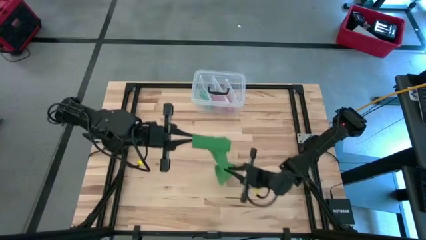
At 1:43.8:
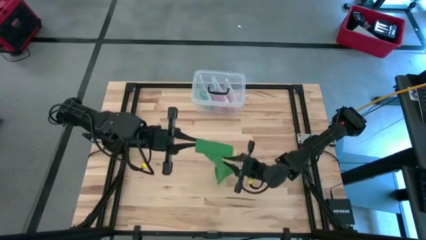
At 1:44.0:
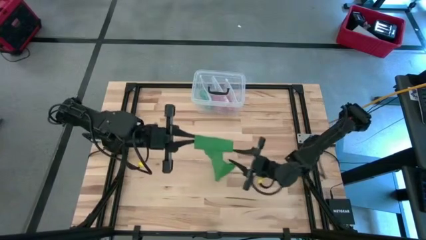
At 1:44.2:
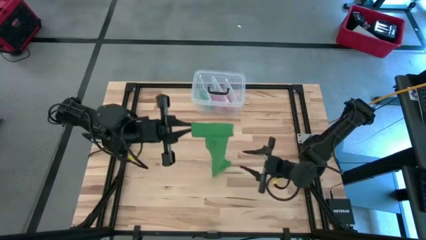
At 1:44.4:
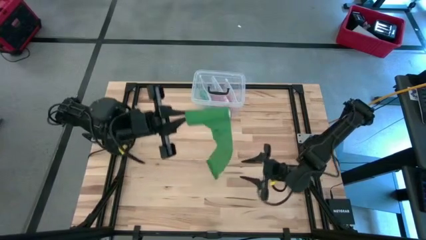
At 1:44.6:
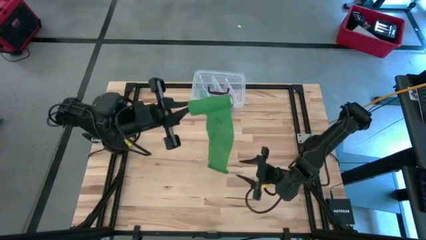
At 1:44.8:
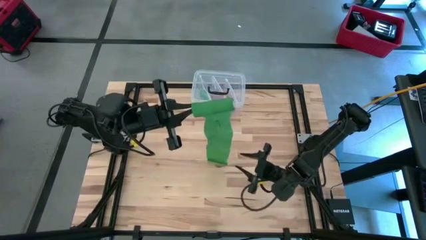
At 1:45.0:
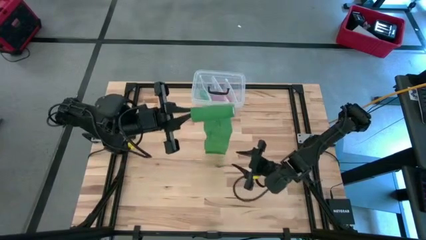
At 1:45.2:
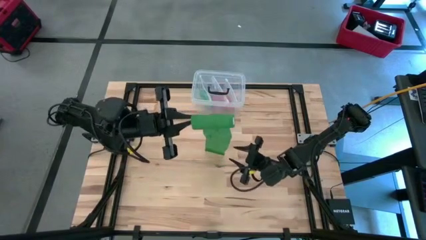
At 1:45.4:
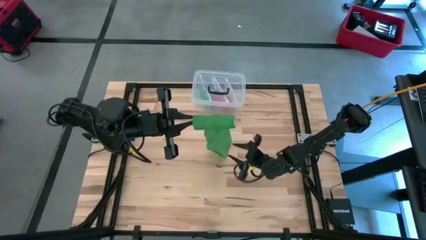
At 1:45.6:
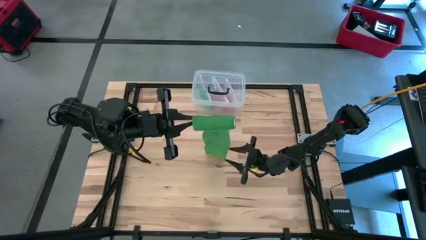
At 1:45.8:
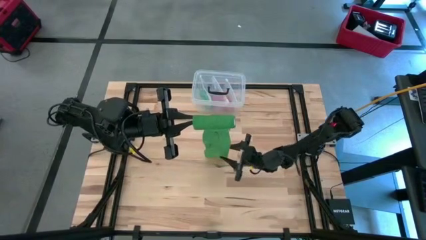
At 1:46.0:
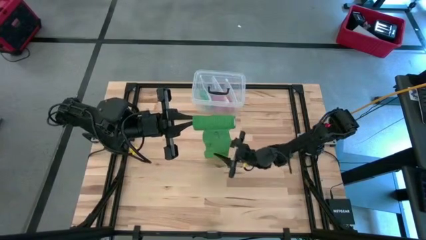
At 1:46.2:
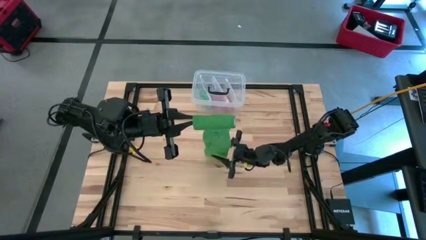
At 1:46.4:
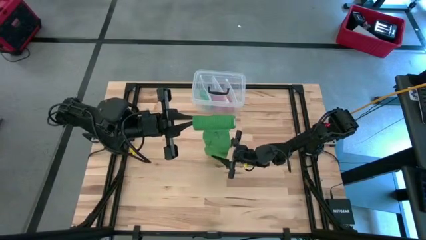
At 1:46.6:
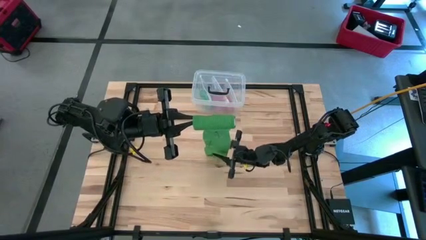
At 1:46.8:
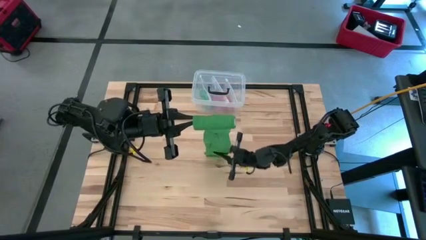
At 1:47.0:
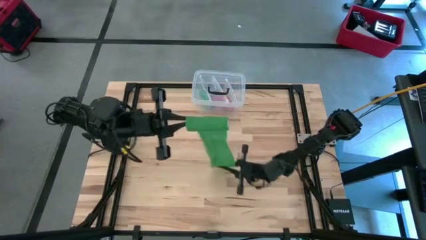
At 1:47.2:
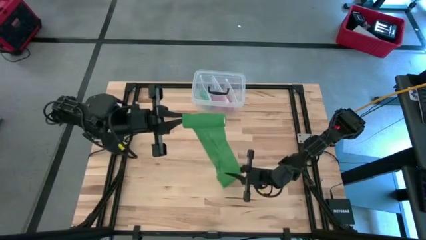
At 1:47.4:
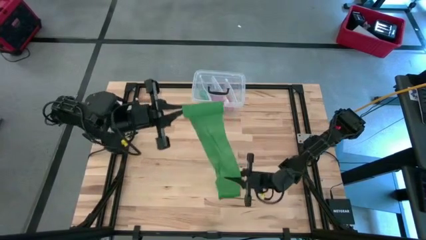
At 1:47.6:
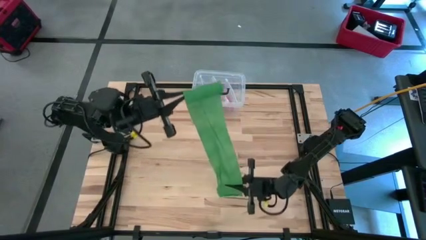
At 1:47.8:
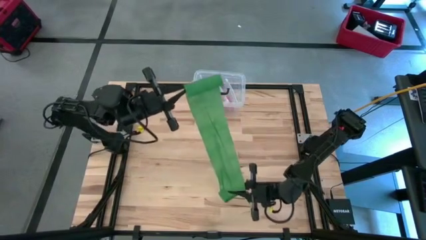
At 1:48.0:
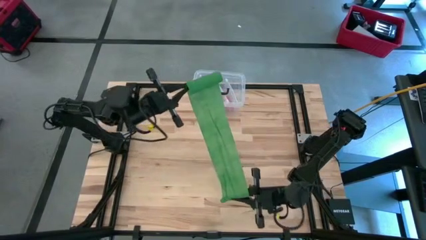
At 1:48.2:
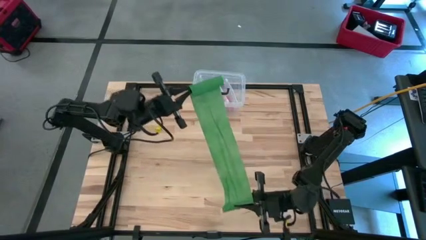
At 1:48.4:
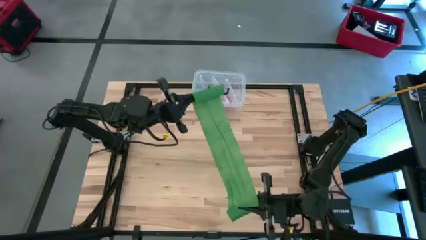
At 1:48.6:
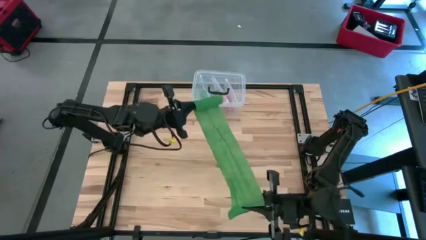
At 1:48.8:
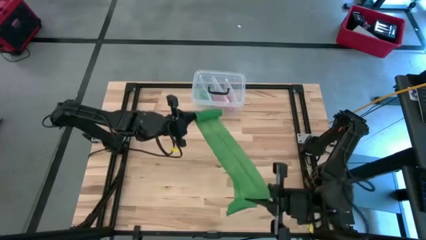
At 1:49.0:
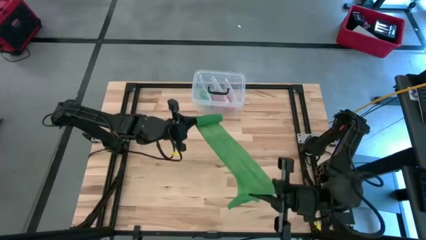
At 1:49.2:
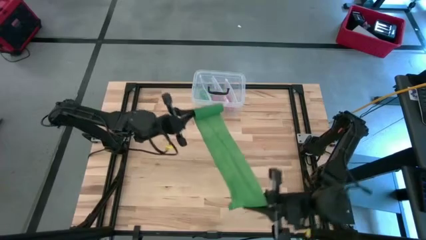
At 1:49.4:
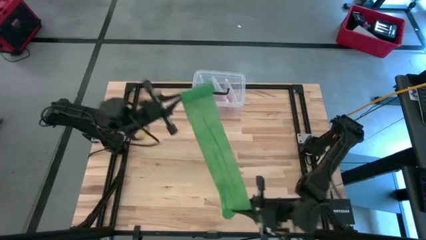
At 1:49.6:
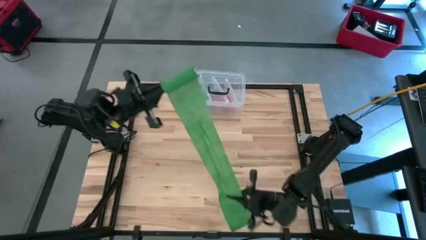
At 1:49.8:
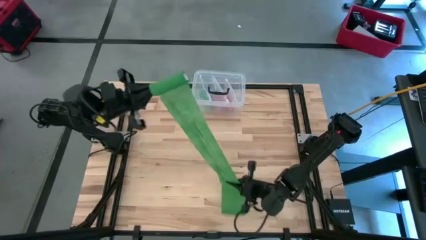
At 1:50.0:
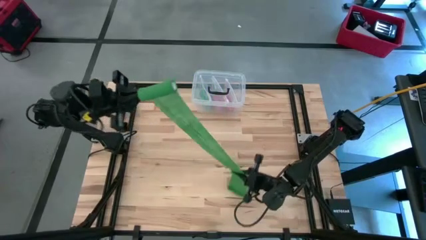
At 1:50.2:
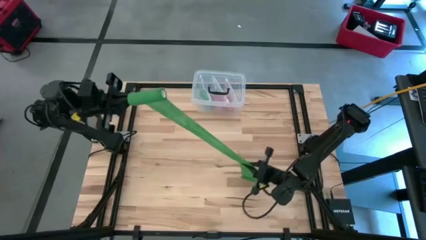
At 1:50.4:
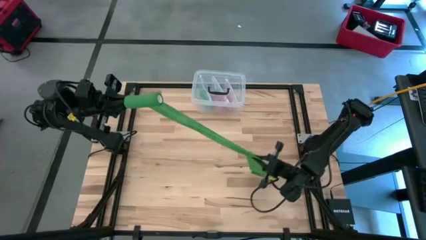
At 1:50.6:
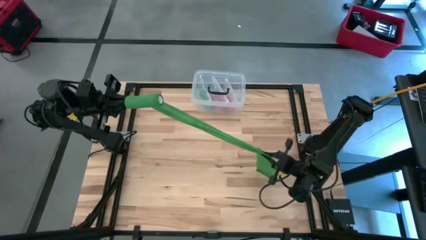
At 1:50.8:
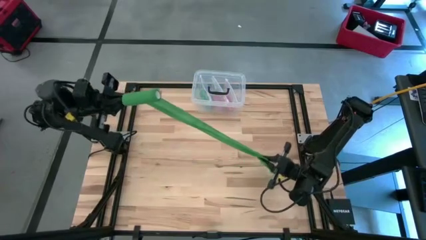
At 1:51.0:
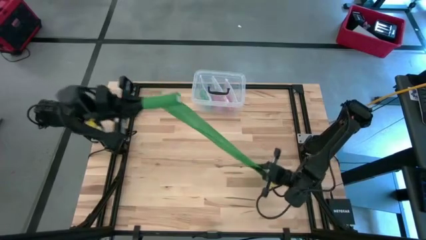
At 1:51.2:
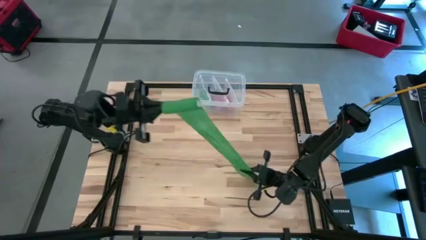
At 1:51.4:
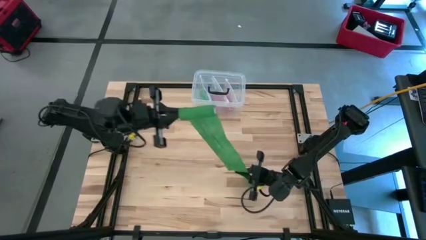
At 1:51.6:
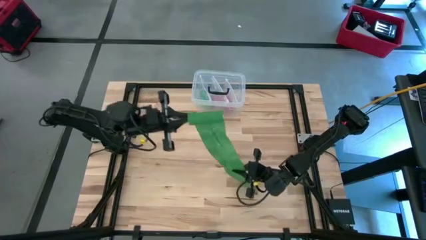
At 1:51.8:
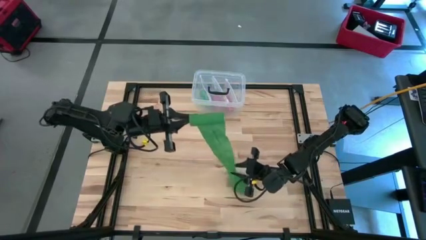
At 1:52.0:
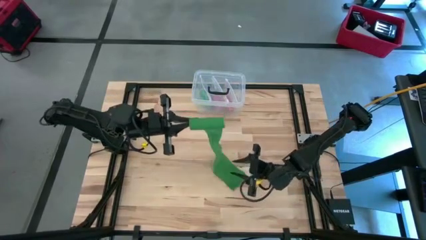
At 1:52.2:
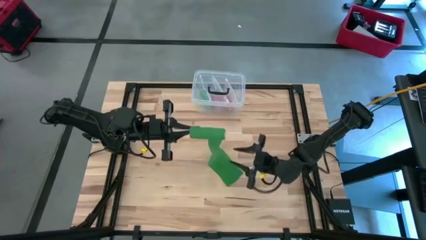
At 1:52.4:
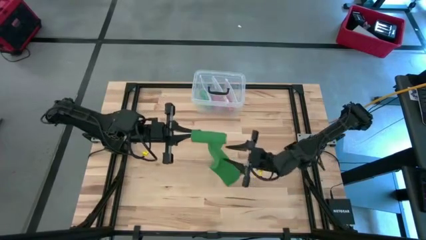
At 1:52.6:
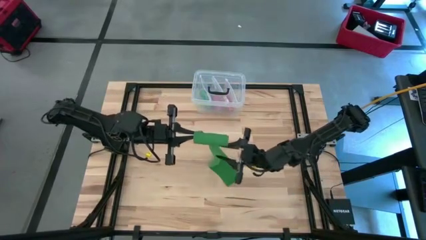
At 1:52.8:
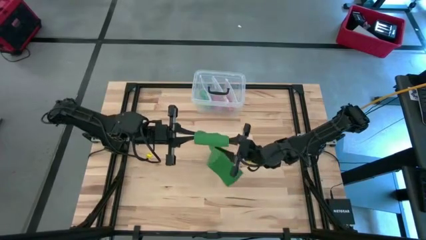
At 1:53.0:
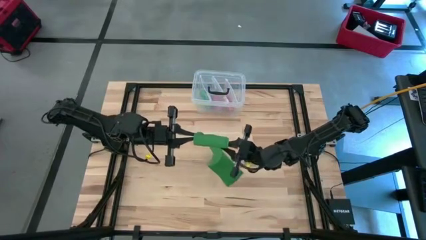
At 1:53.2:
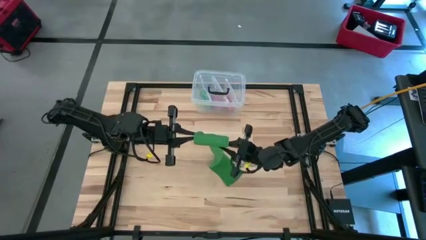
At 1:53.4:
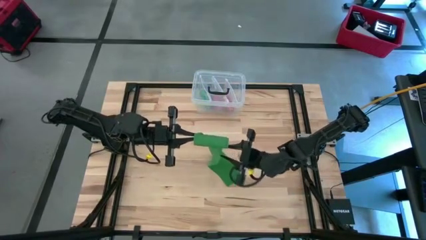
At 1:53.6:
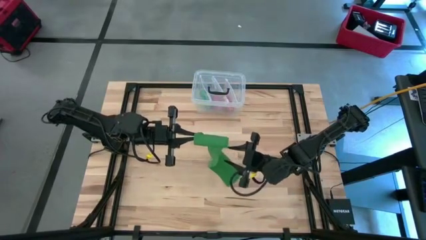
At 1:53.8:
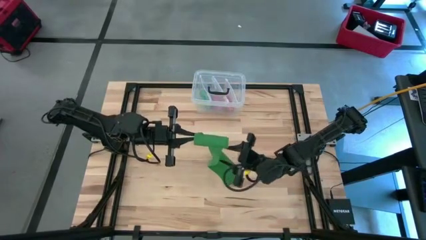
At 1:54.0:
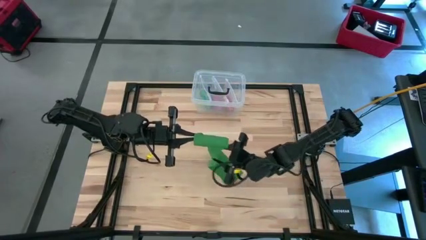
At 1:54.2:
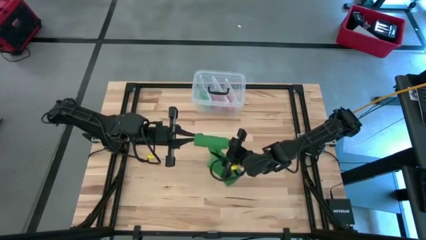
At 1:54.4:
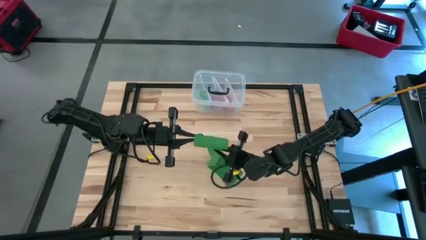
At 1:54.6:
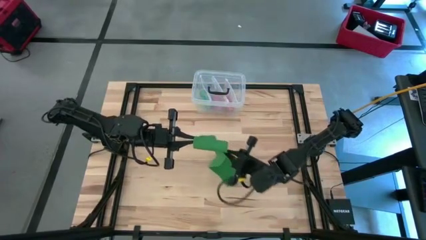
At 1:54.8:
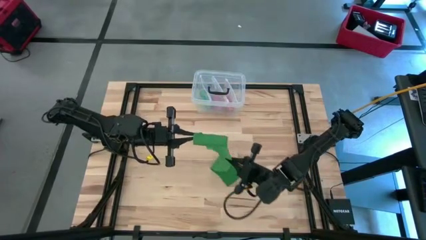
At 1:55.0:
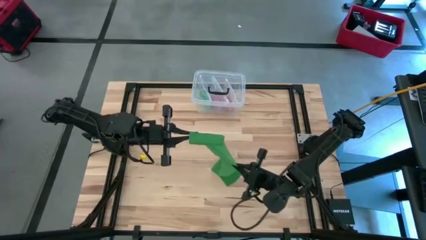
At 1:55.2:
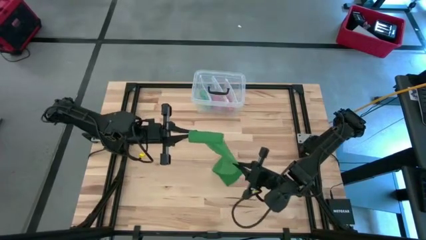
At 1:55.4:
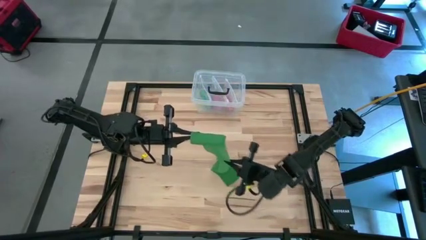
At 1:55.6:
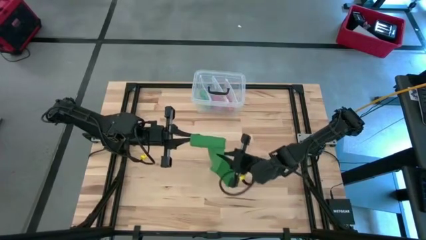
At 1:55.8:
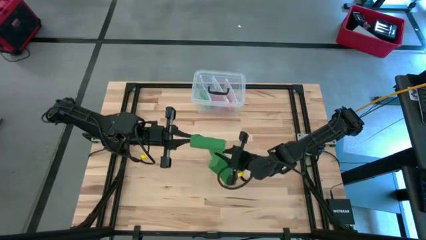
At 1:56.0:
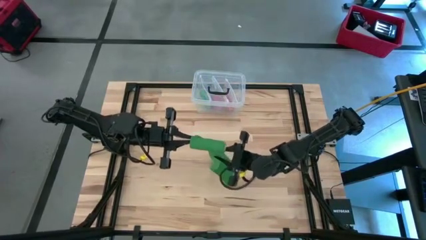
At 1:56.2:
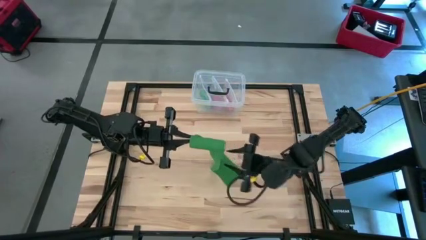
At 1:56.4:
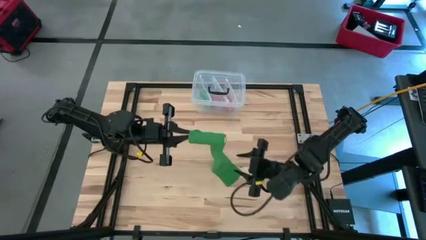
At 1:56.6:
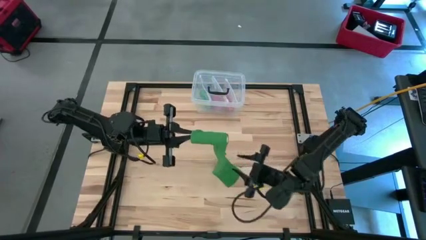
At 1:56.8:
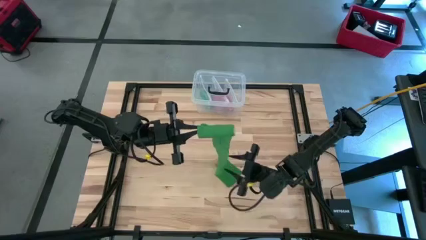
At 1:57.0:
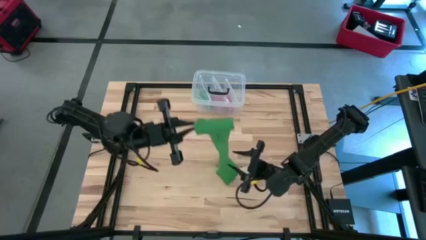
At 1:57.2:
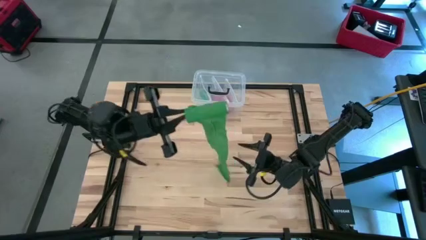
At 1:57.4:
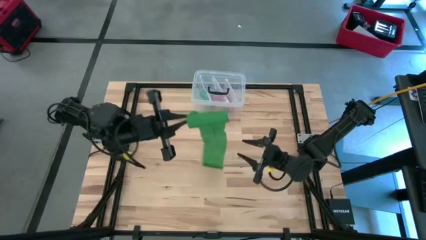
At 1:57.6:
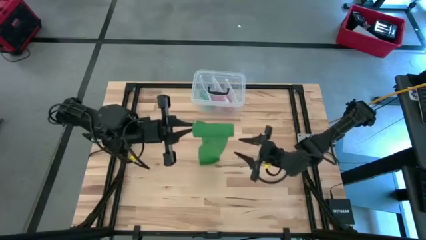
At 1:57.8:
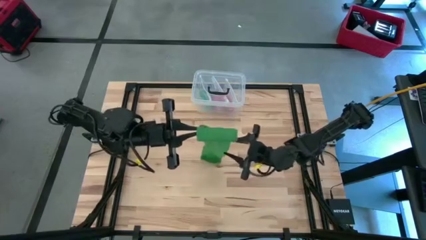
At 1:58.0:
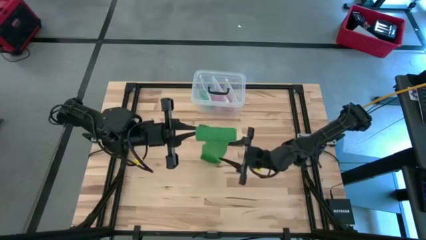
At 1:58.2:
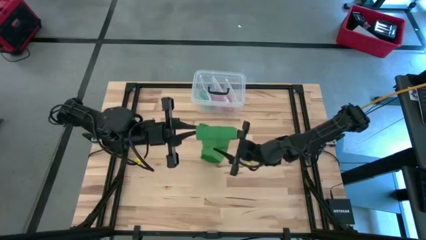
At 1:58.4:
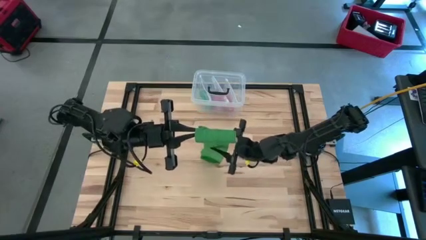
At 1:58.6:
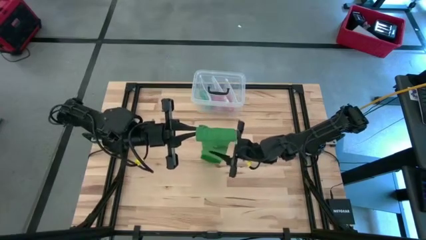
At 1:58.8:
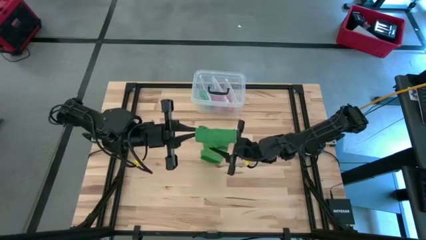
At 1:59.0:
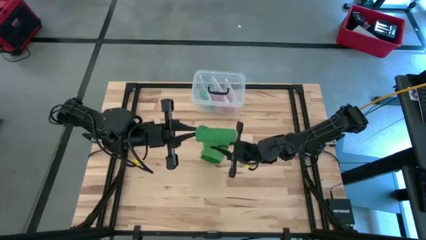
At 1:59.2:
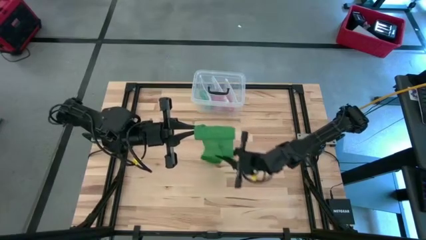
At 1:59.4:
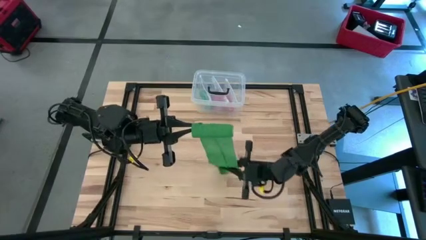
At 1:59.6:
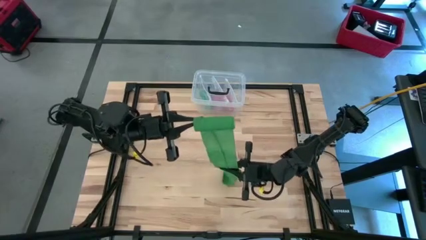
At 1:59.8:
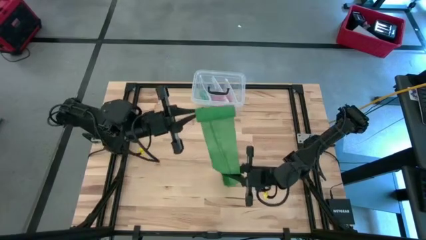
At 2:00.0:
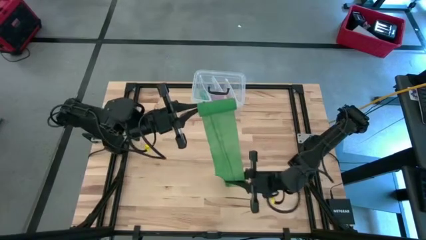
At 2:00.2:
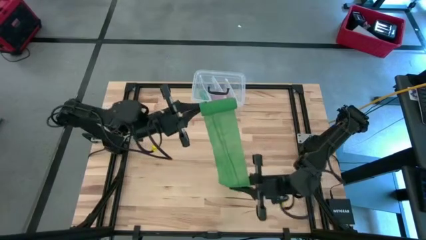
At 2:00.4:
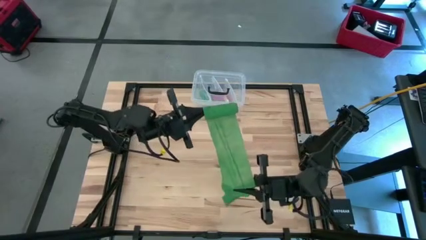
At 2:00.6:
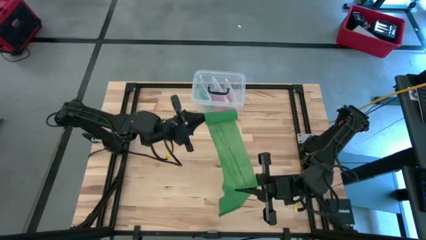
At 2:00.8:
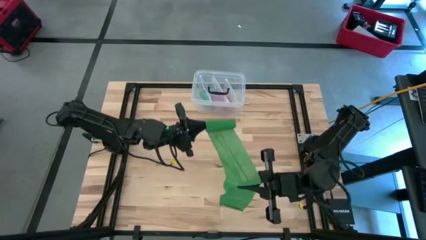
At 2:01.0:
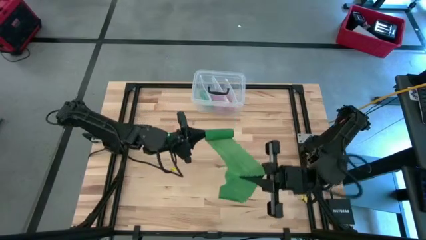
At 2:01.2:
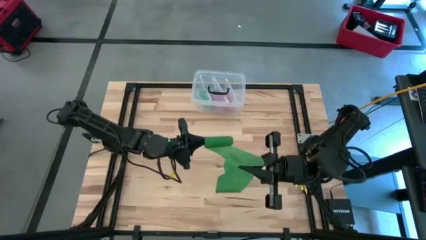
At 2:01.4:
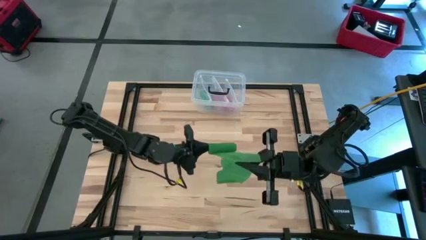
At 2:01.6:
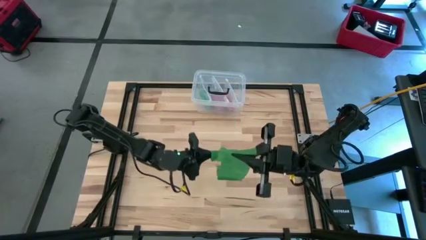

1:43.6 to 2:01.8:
Task: Roll bandage
Roll the green bandage
